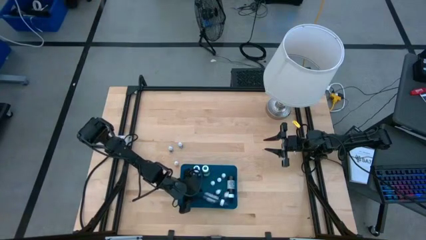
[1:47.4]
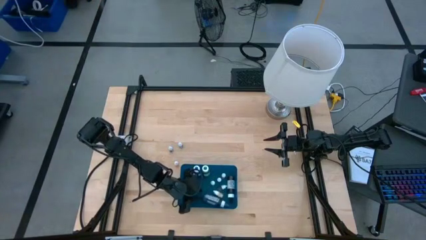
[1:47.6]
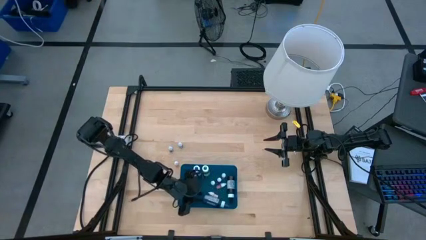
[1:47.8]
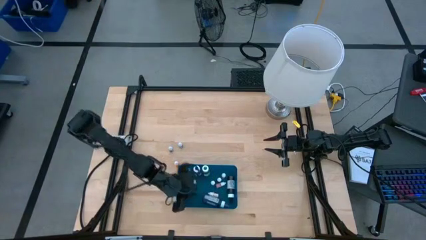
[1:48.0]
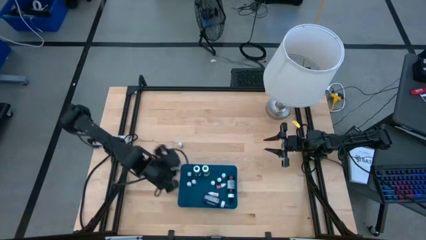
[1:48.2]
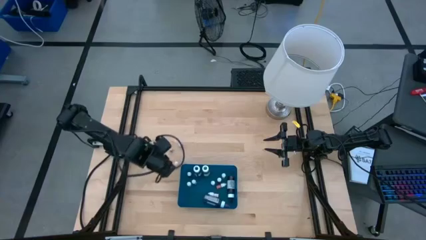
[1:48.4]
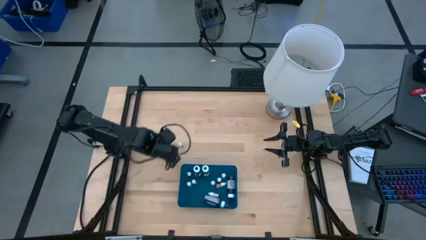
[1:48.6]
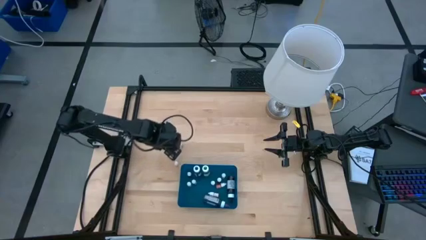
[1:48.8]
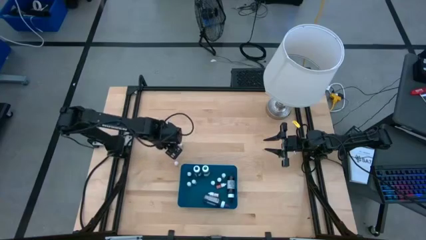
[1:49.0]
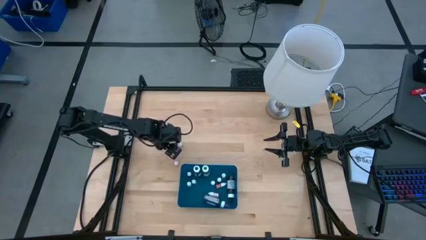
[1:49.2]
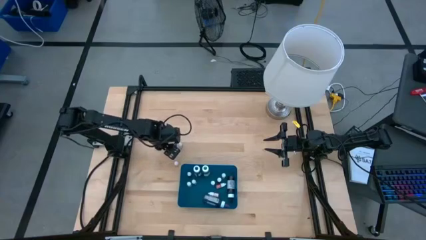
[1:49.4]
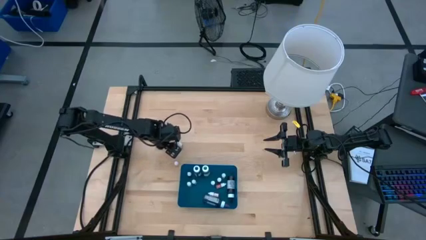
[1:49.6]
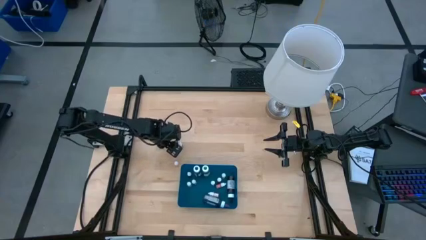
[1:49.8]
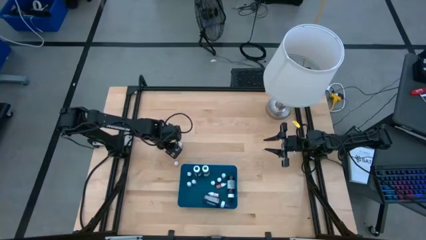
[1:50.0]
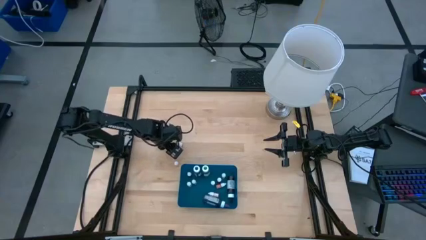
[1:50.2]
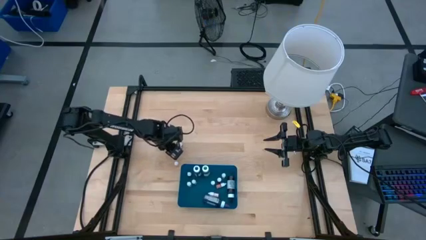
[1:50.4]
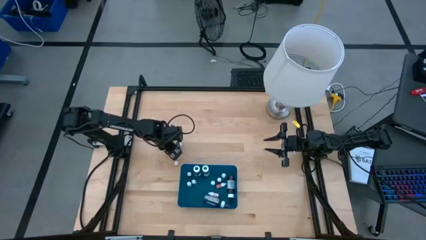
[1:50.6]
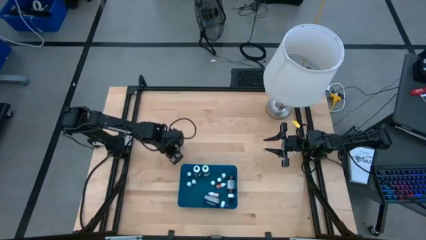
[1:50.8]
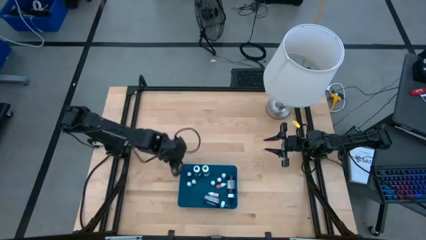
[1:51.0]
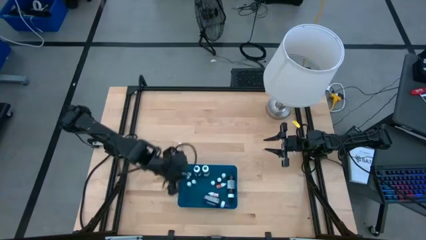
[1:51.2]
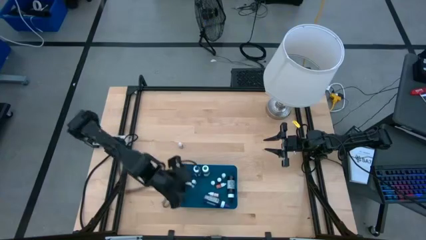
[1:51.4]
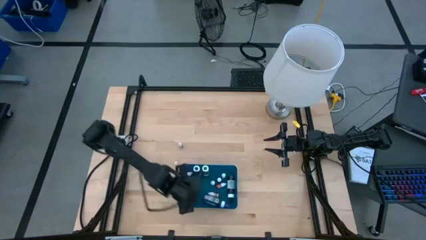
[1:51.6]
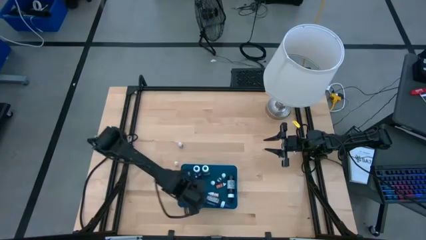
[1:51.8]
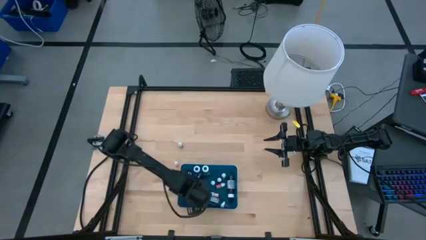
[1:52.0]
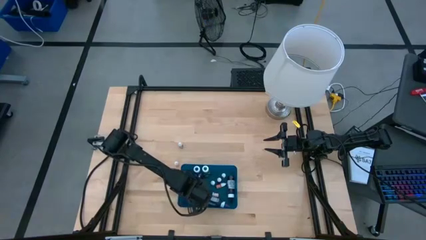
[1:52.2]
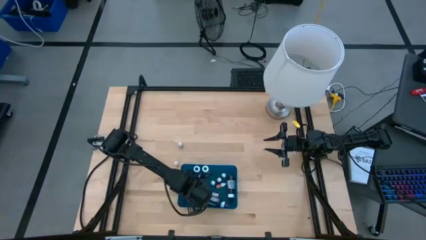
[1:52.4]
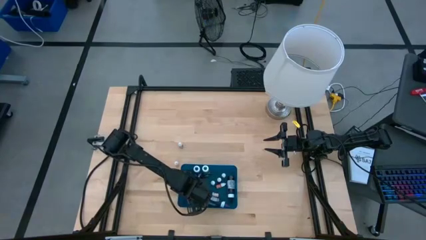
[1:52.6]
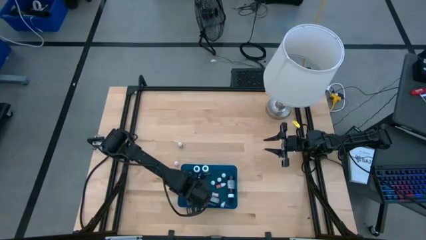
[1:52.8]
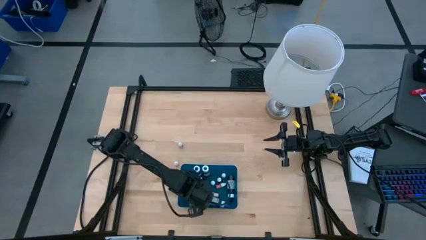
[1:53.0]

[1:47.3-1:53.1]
Task: Pick & Place food coloring
Put the blue food coloring bottle into the blue container

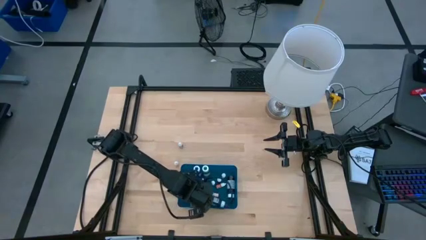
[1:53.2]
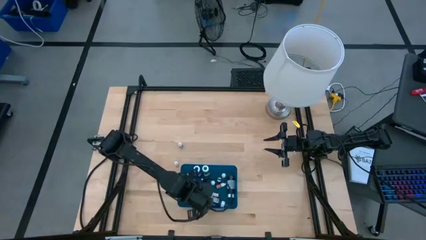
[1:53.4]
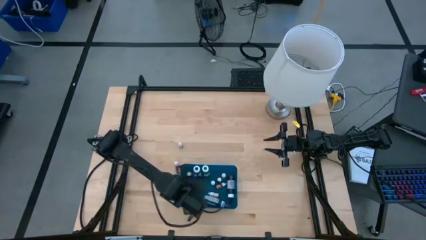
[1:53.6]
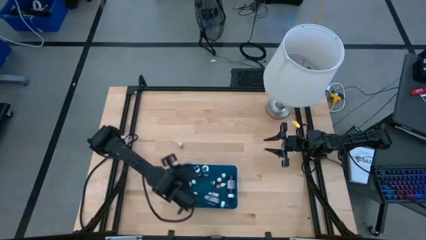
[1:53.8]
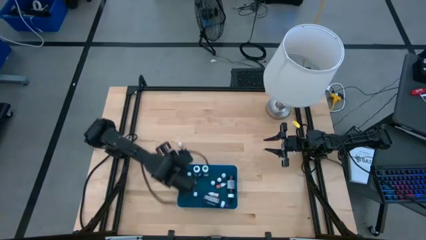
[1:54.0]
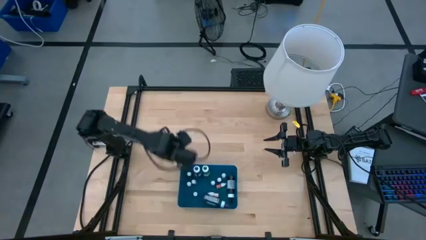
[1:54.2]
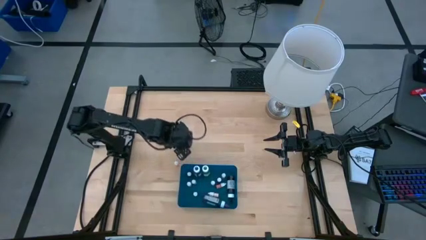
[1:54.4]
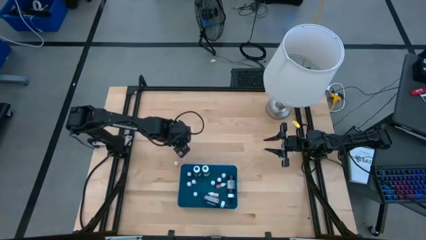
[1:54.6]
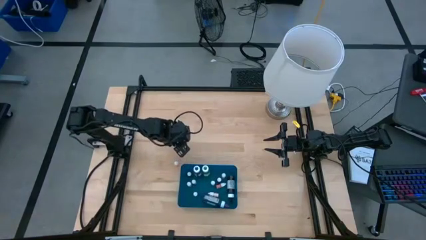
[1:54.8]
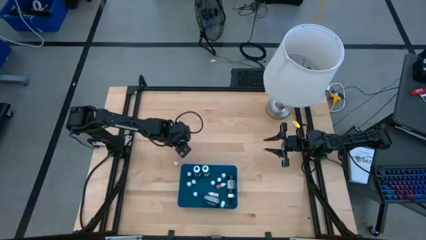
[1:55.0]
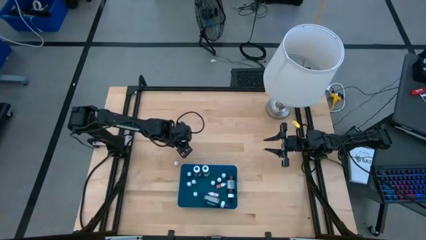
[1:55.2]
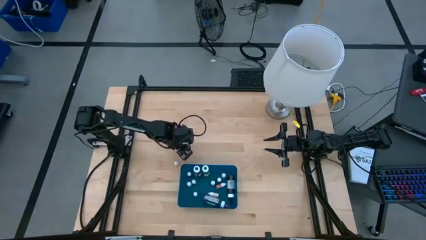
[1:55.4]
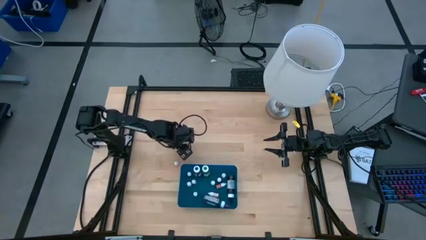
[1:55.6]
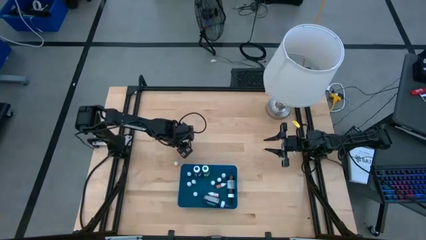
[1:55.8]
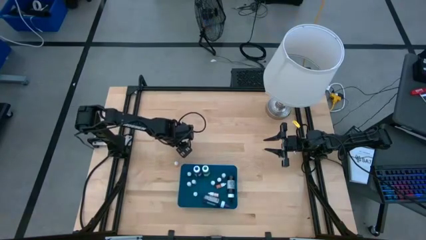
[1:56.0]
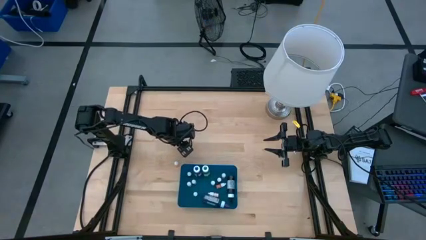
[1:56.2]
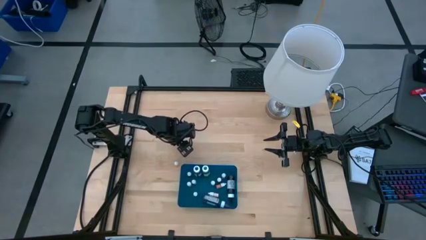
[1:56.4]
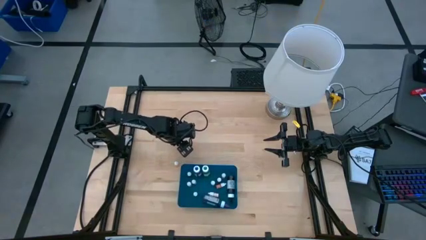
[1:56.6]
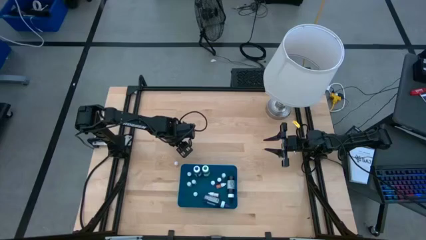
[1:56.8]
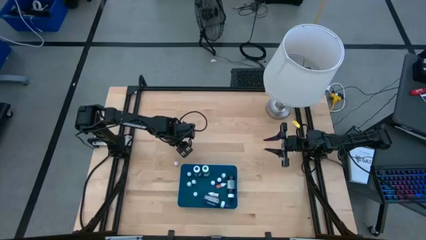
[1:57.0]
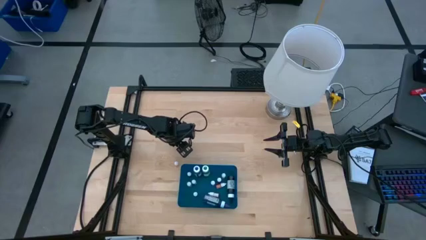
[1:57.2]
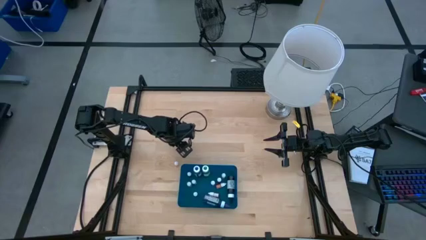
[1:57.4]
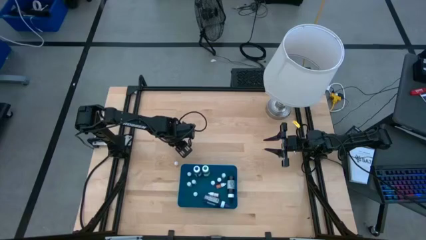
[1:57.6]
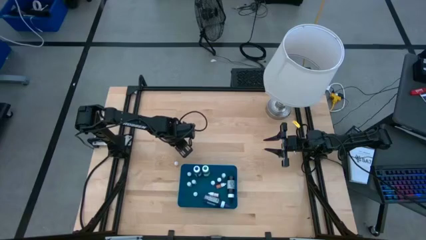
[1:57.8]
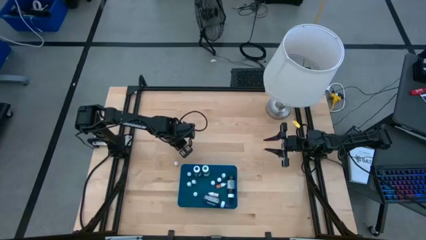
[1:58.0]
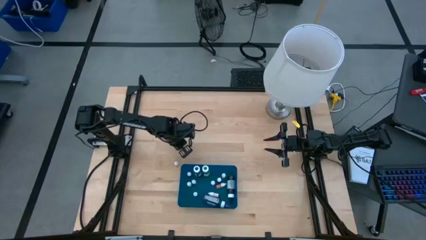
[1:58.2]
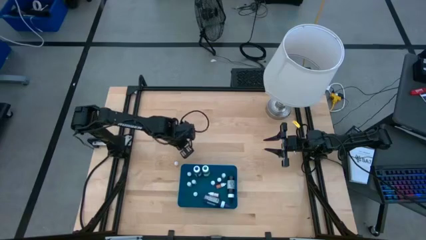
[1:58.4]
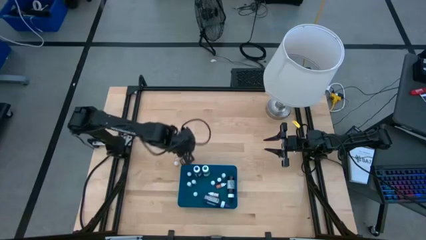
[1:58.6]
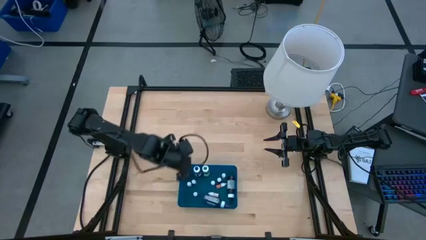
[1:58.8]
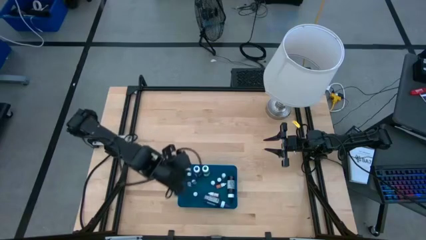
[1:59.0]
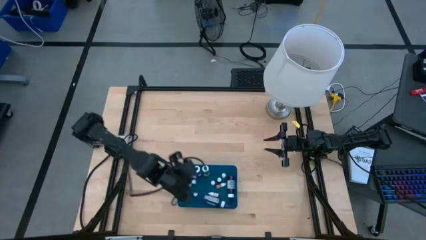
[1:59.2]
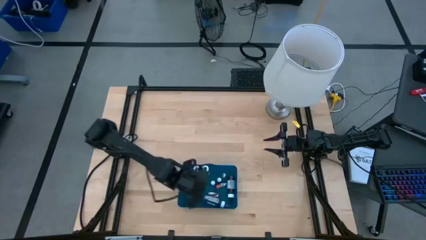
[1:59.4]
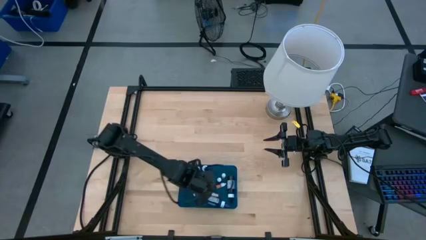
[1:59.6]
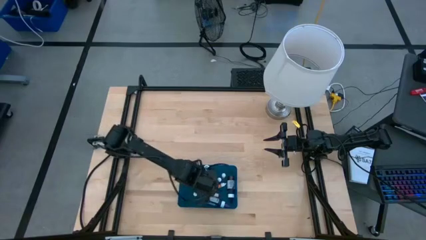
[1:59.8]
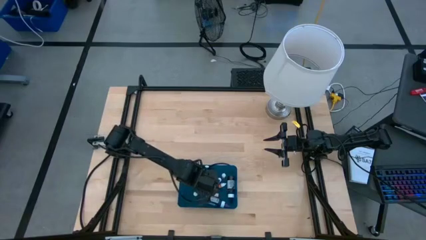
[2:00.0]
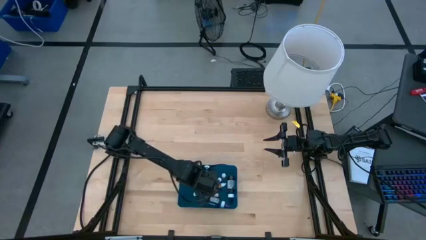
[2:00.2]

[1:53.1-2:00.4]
Put the purple food coloring bottle into the blue container

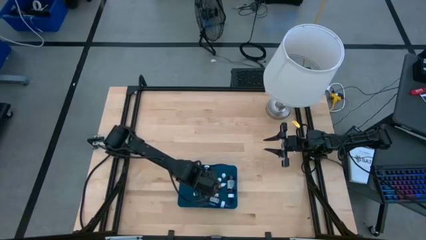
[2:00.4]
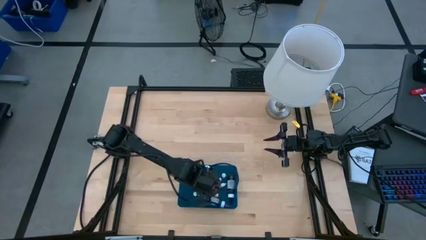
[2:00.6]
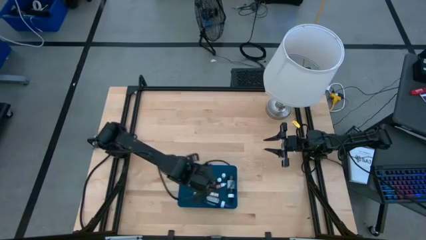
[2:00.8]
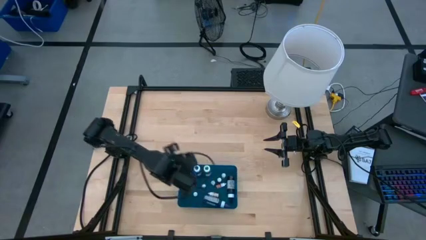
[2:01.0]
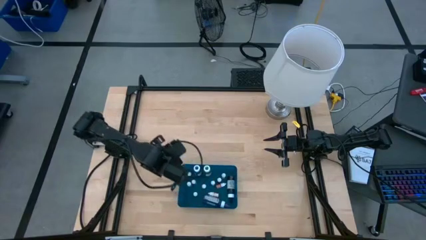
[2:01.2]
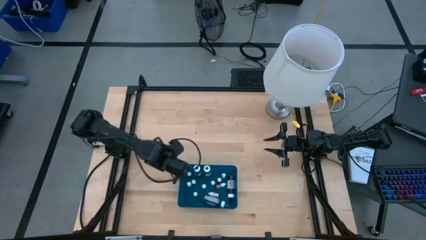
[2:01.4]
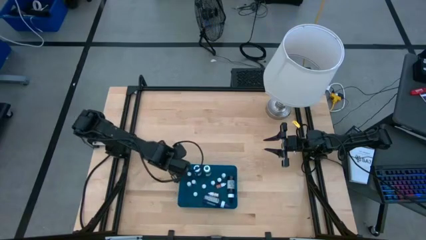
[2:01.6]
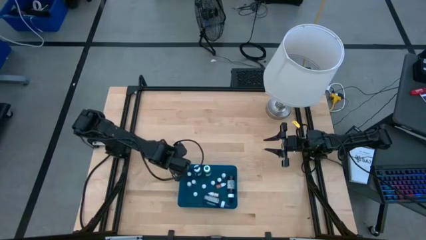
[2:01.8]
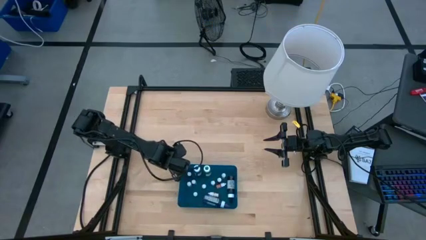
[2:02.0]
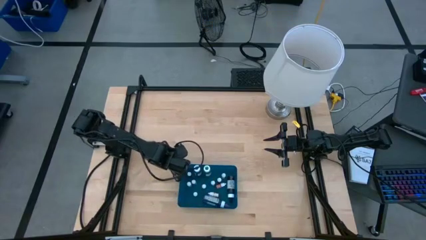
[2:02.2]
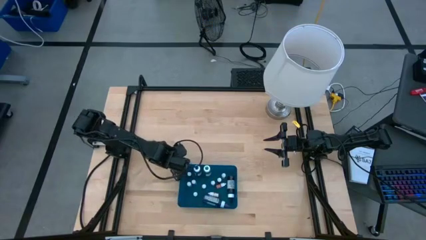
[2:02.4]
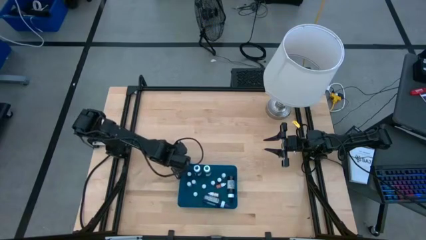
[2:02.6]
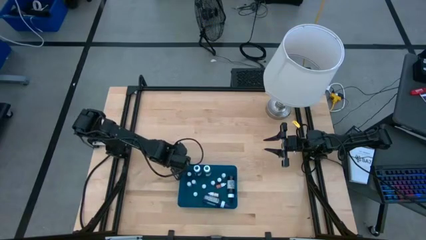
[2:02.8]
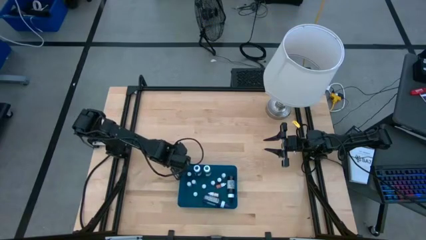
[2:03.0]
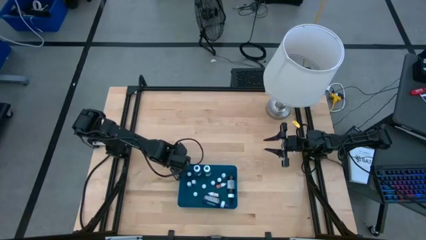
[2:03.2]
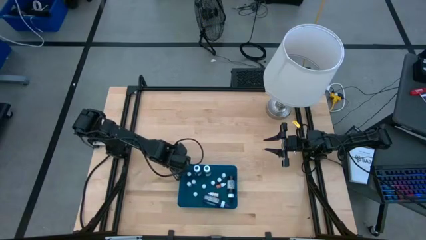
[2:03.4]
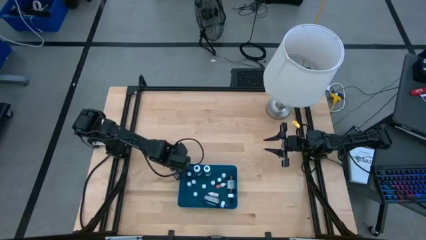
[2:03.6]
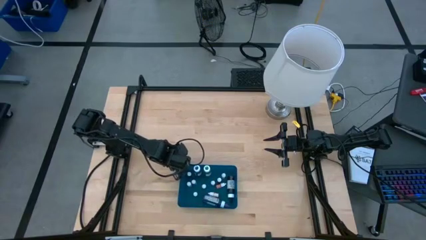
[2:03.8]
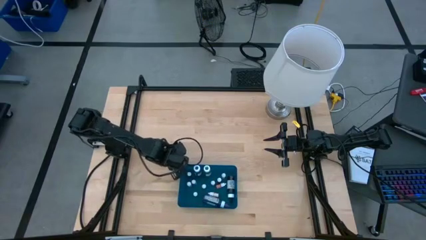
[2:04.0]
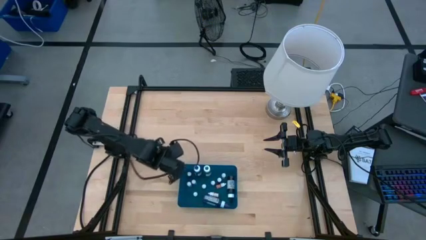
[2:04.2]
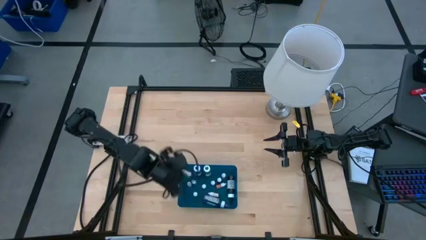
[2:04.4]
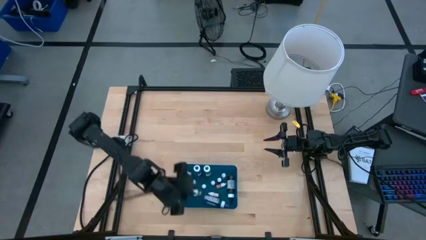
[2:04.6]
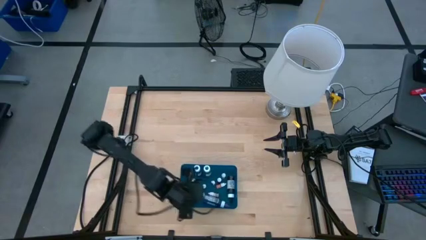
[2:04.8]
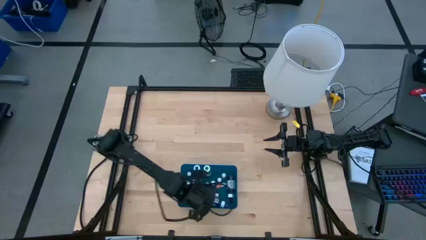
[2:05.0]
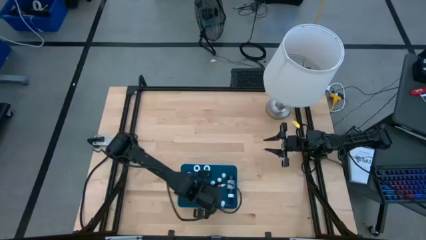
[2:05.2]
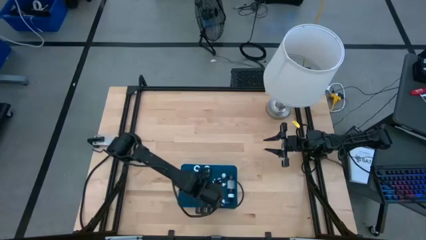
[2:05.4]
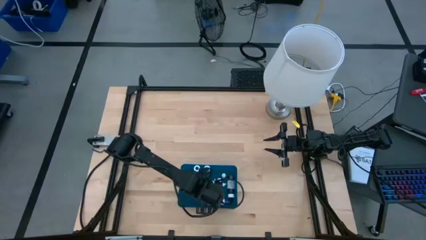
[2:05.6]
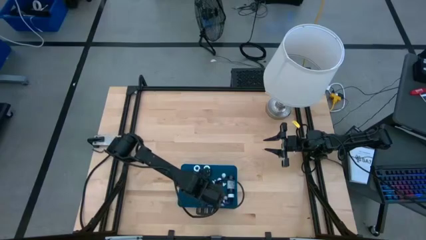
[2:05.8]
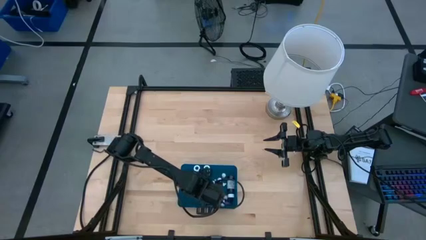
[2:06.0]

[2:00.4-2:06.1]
Put the orange food coloring bottle into the blue container
